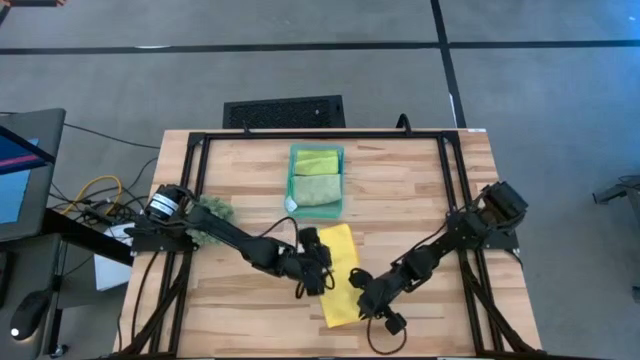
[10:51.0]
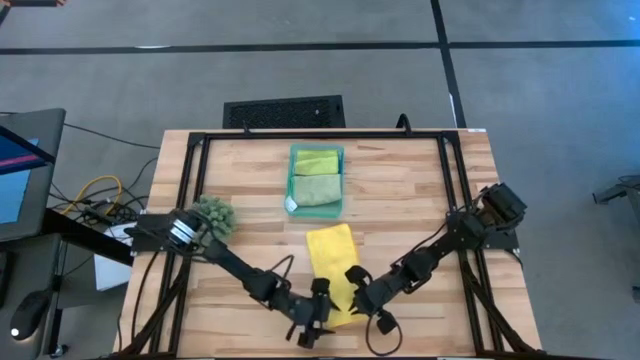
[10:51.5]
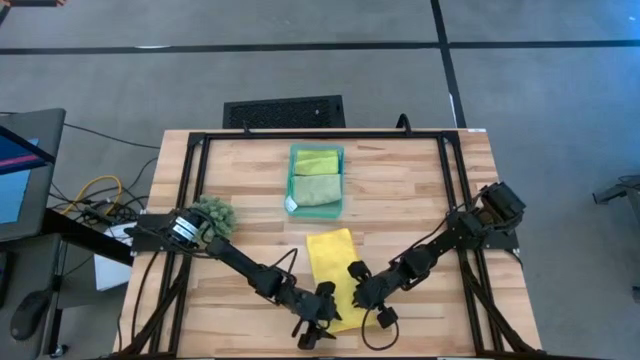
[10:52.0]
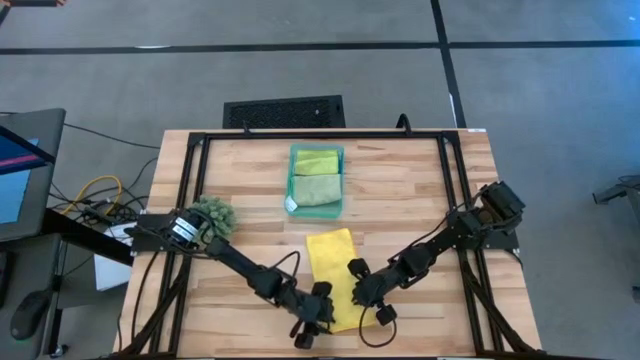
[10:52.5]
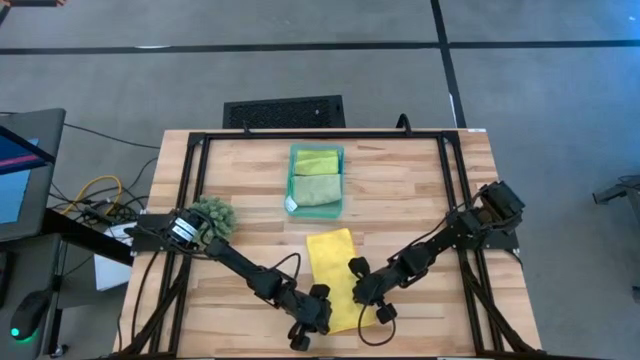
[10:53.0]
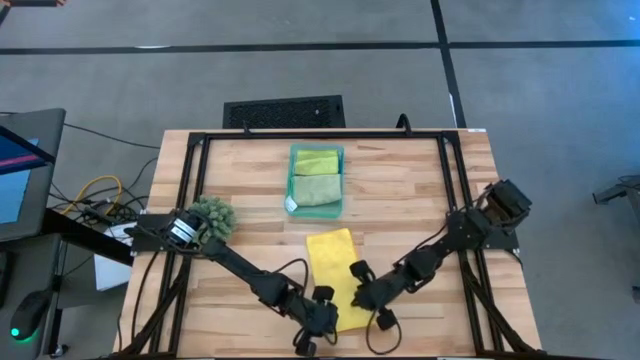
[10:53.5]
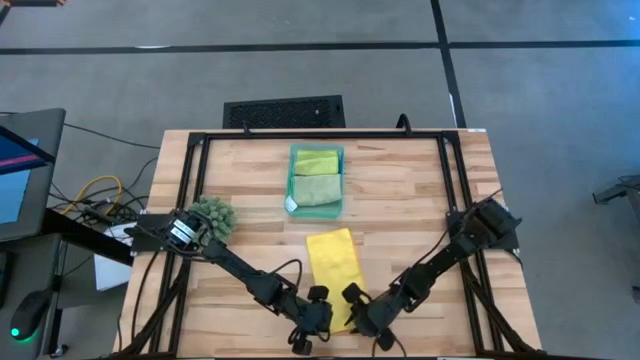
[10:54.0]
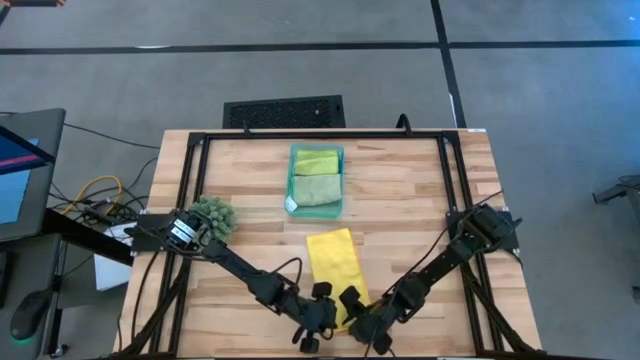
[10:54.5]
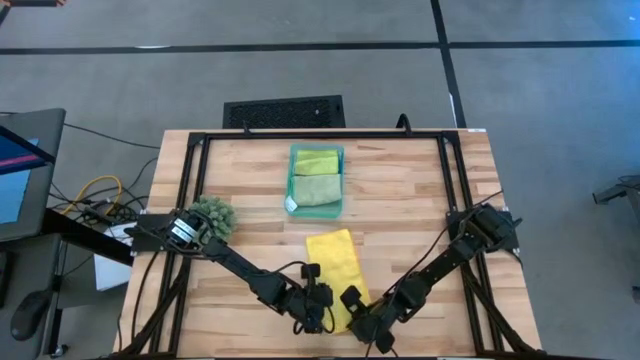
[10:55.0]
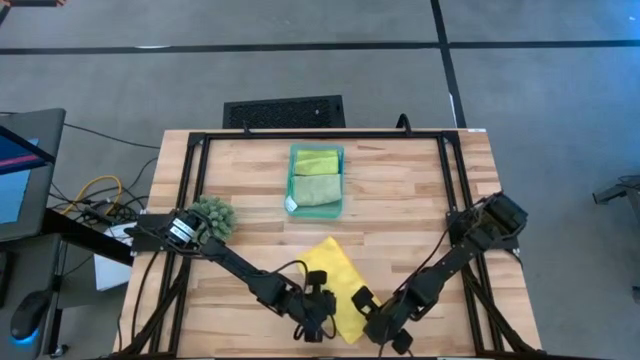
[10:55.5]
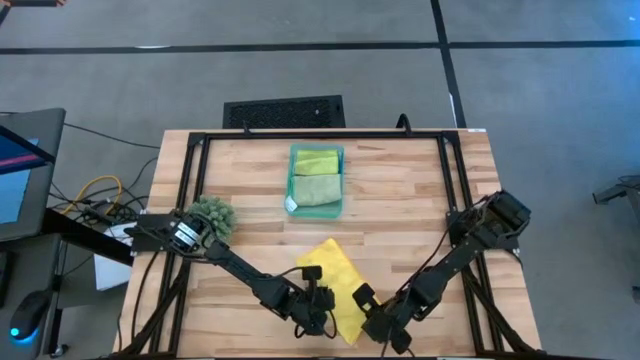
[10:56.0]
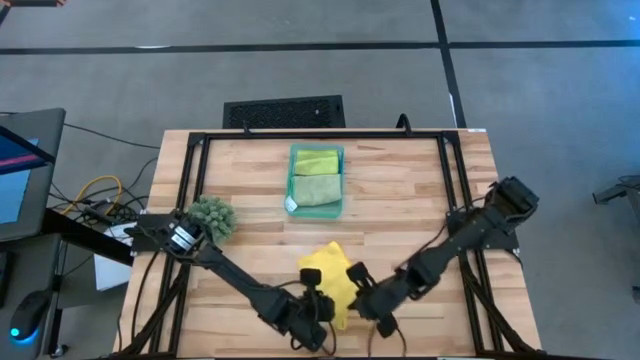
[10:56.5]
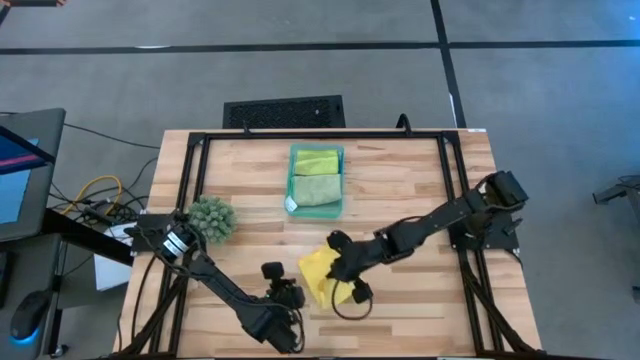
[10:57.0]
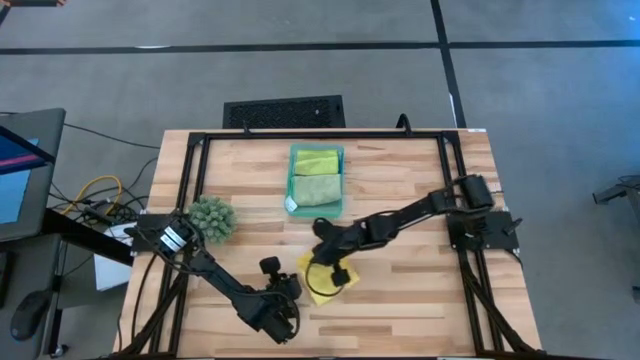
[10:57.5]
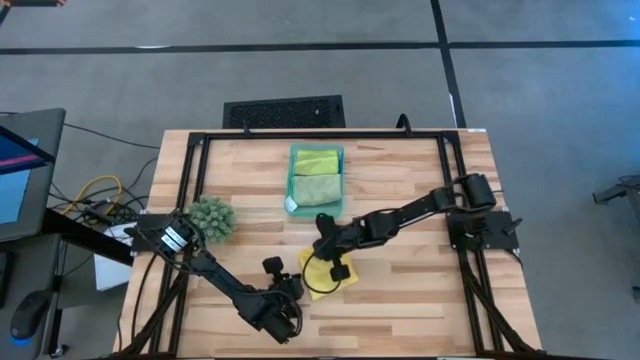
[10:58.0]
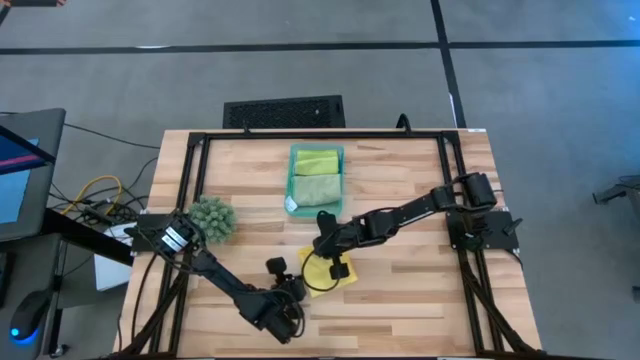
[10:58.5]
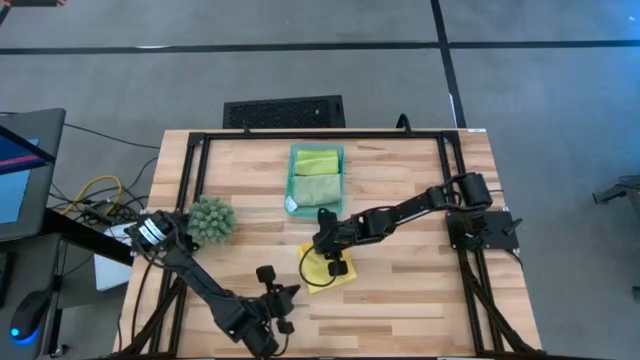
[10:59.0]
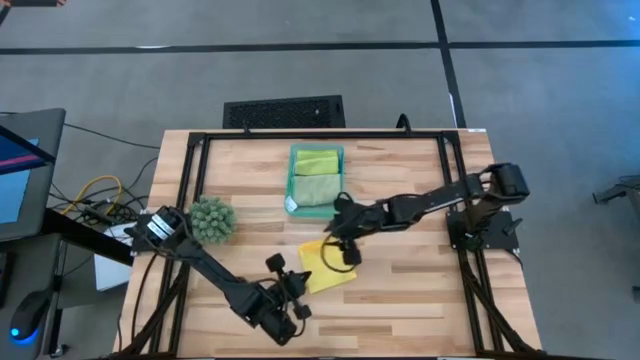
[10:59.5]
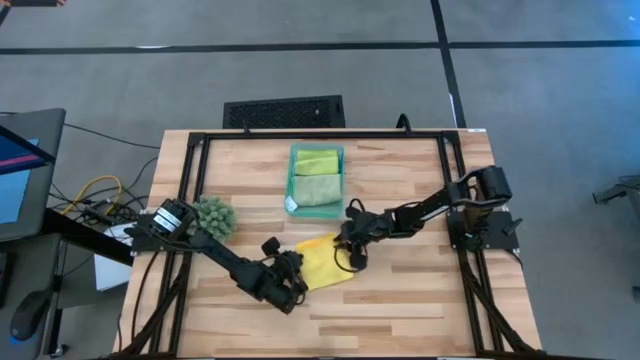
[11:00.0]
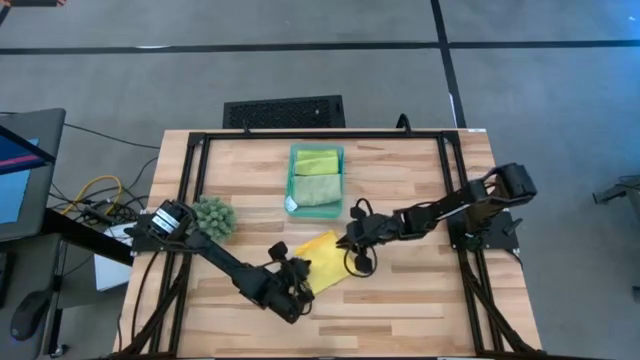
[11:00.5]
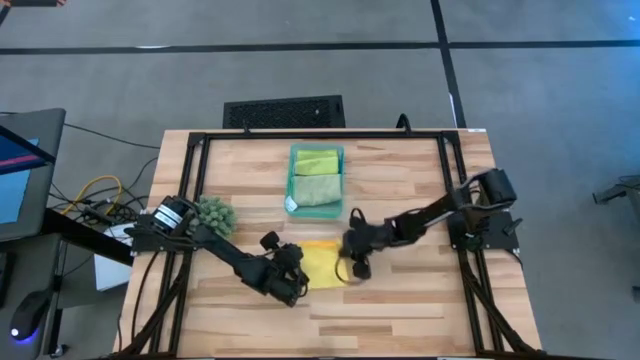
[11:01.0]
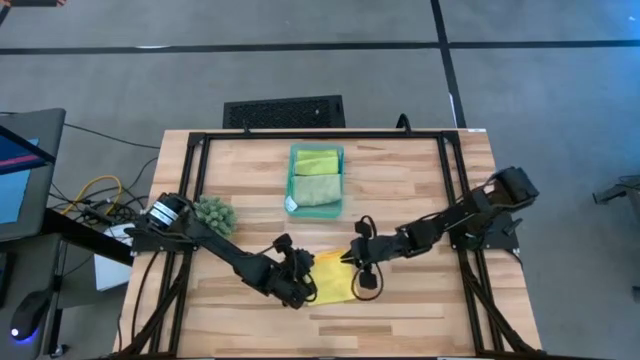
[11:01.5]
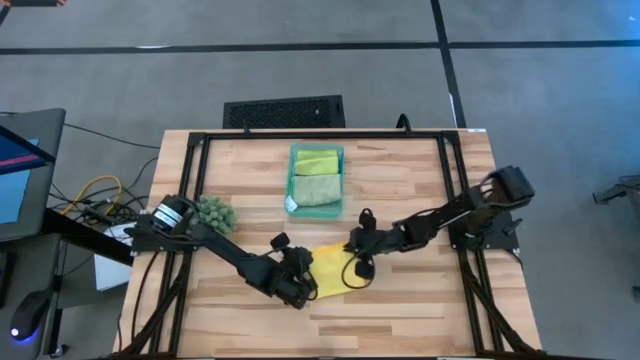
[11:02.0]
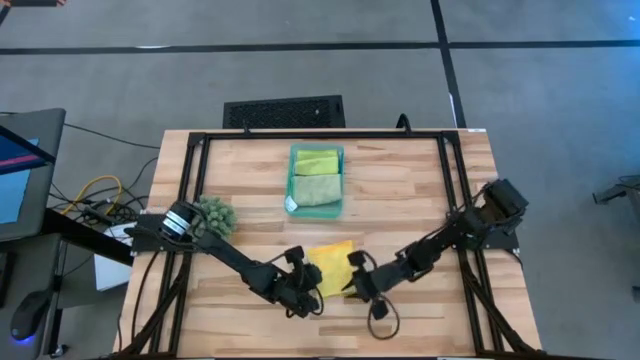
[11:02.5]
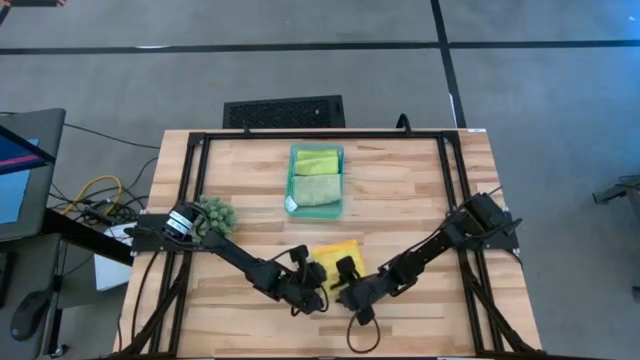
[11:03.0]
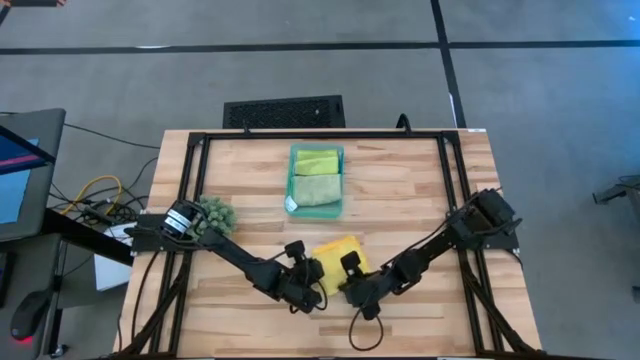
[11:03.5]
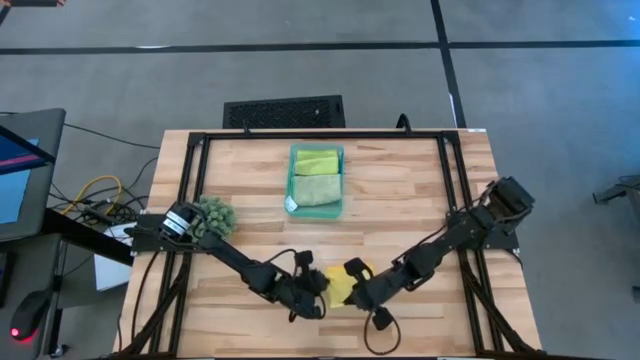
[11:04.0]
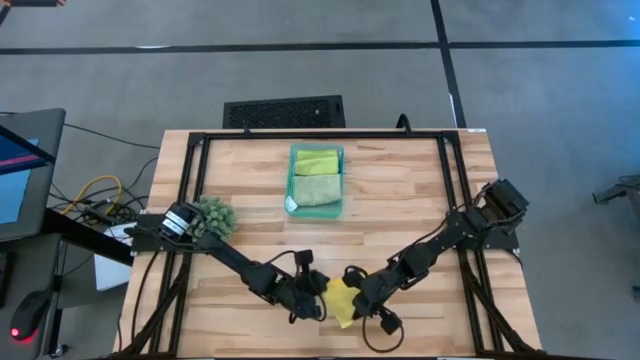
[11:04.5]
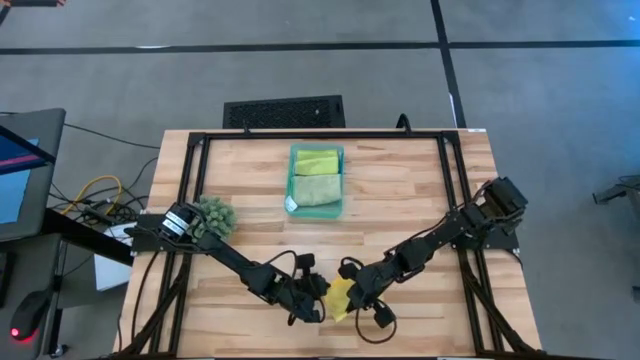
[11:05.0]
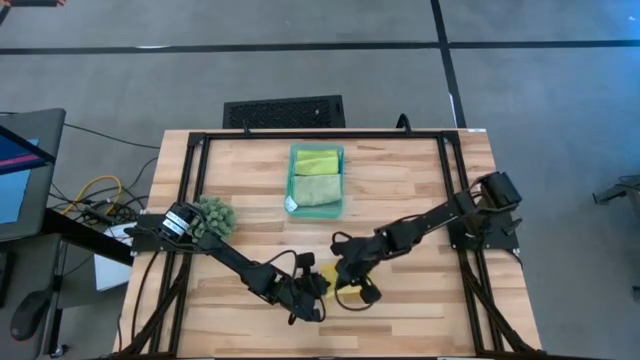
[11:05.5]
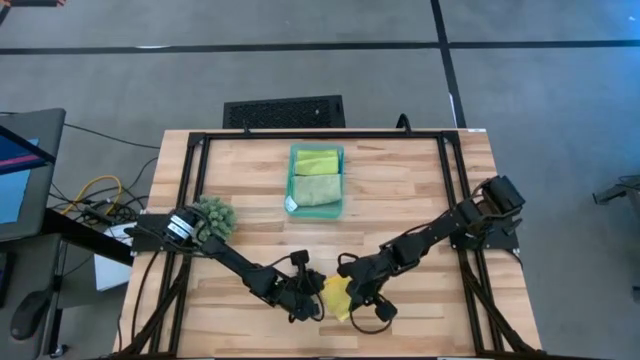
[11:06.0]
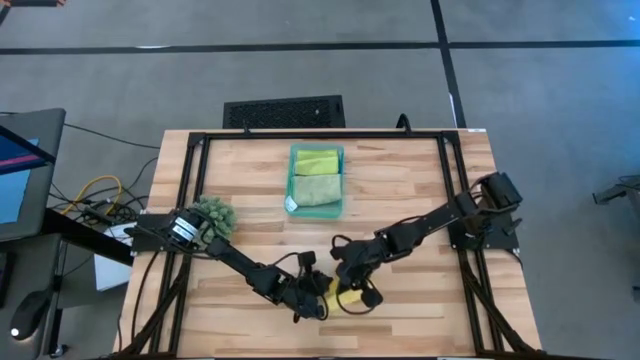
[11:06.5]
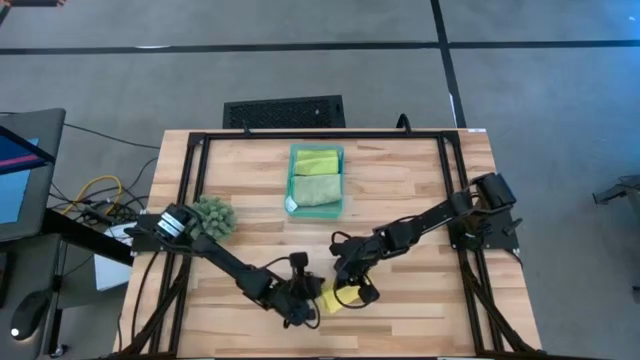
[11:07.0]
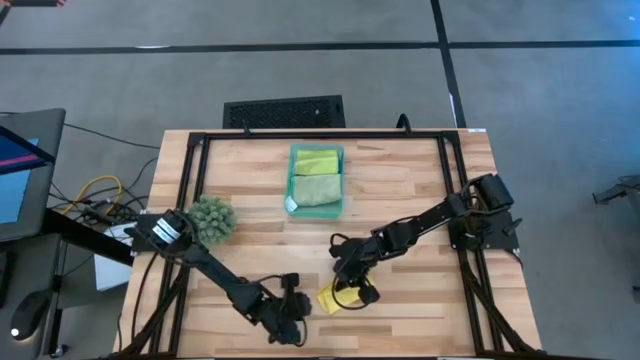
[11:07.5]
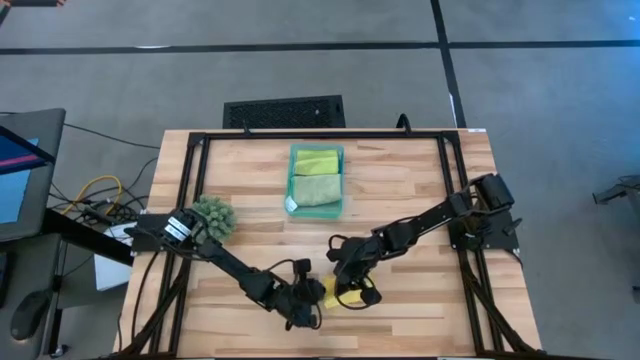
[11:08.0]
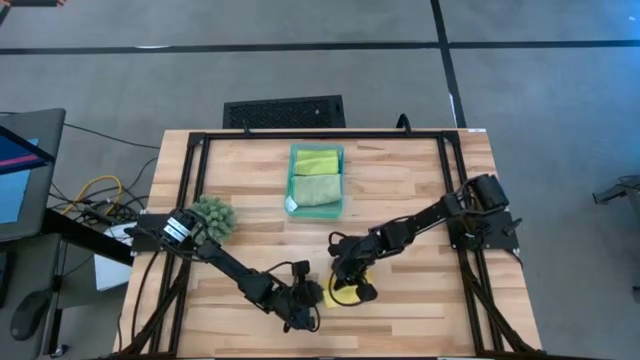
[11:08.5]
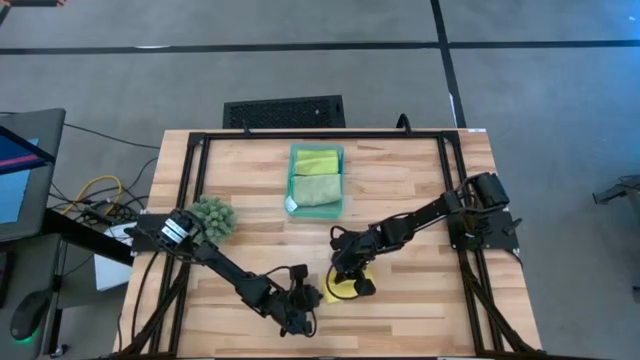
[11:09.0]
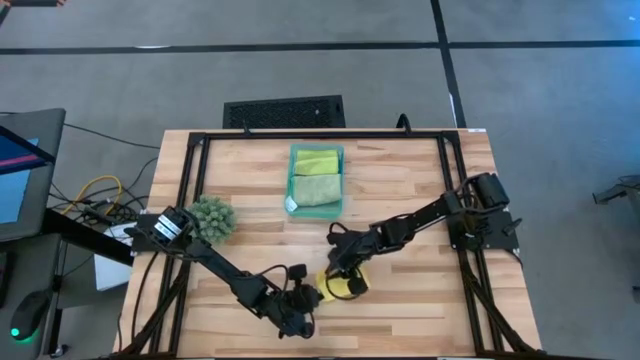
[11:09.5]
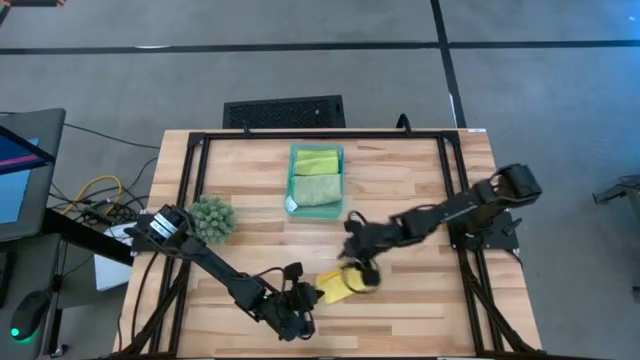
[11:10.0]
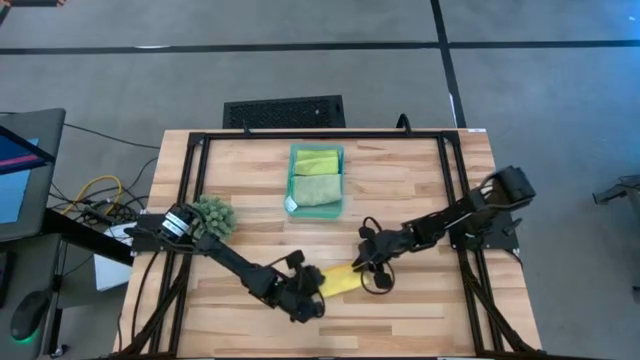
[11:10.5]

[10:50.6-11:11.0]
Task: Fold microfiber towels
Fold the yellow microfiber cloth
